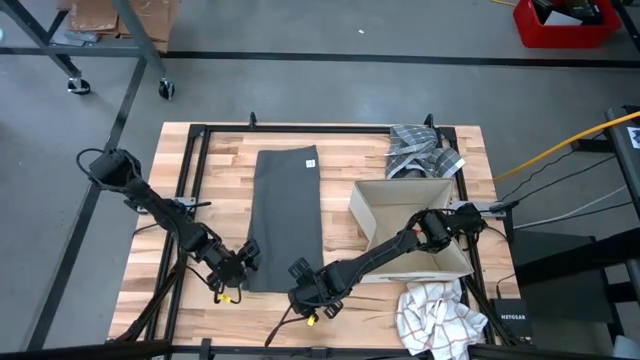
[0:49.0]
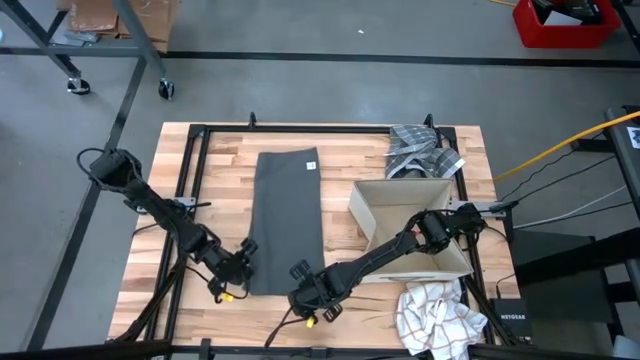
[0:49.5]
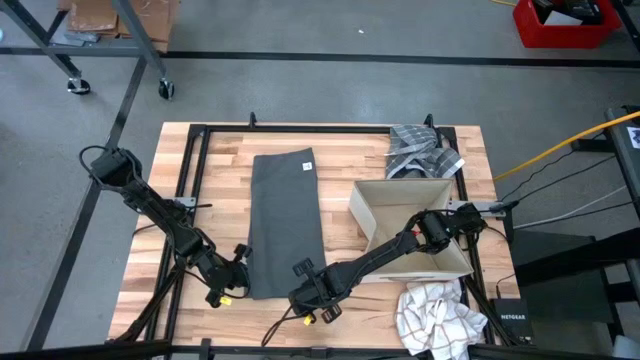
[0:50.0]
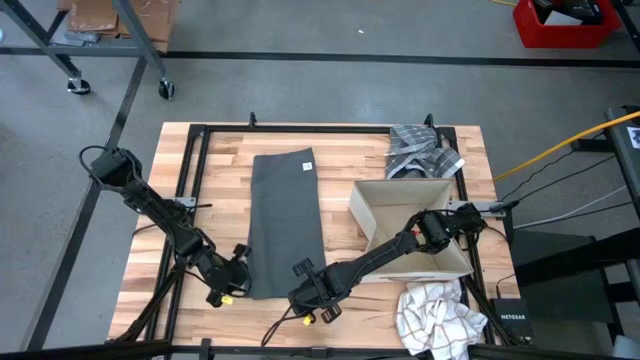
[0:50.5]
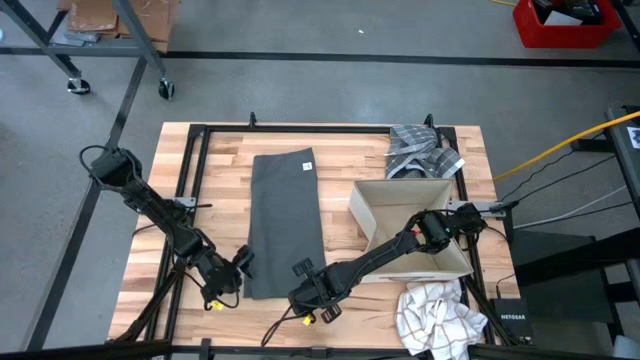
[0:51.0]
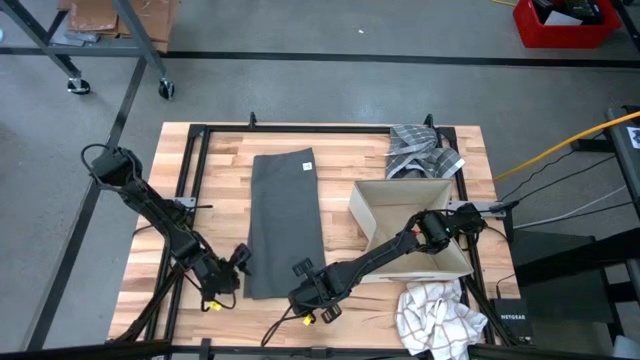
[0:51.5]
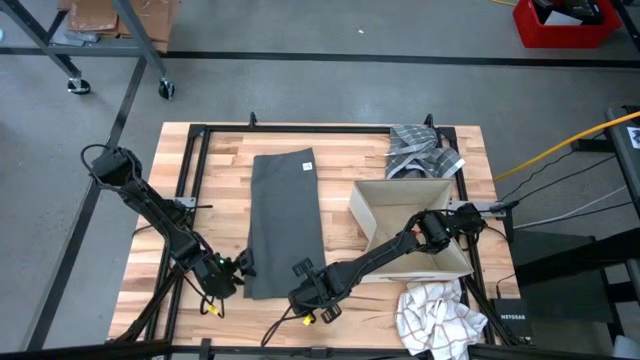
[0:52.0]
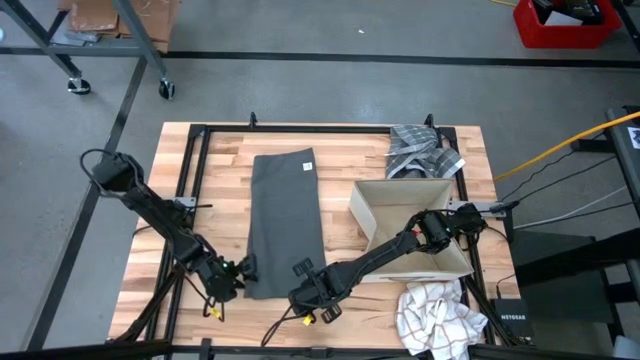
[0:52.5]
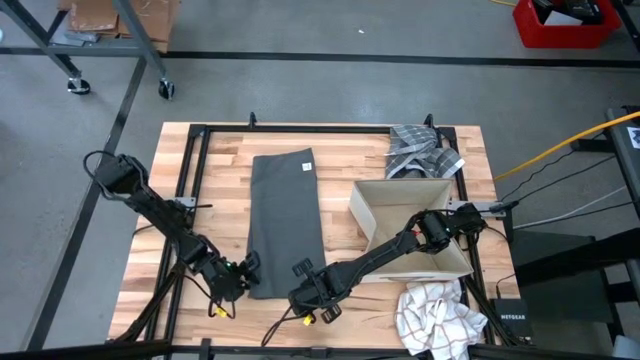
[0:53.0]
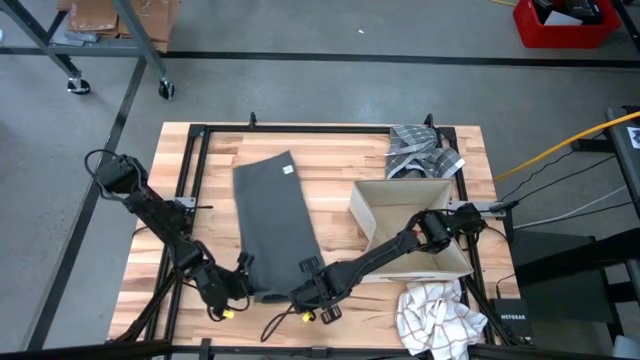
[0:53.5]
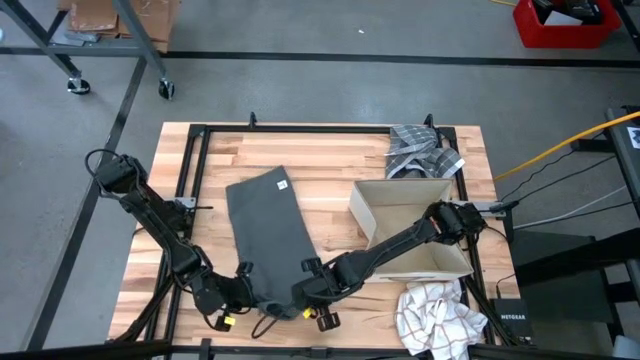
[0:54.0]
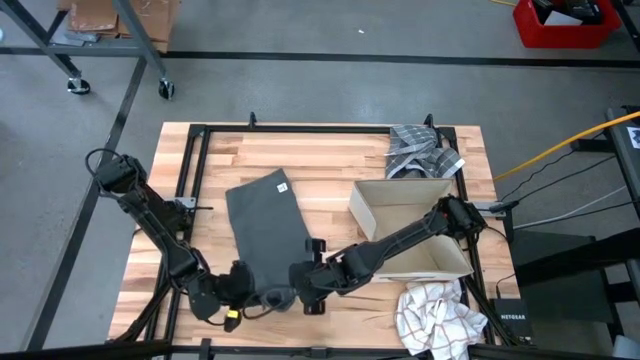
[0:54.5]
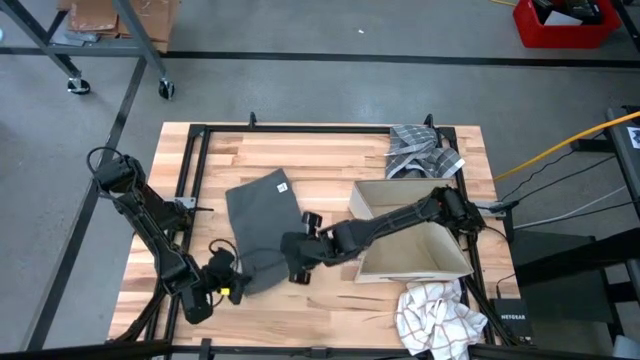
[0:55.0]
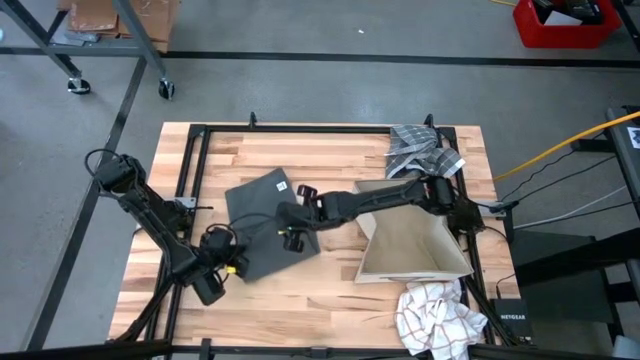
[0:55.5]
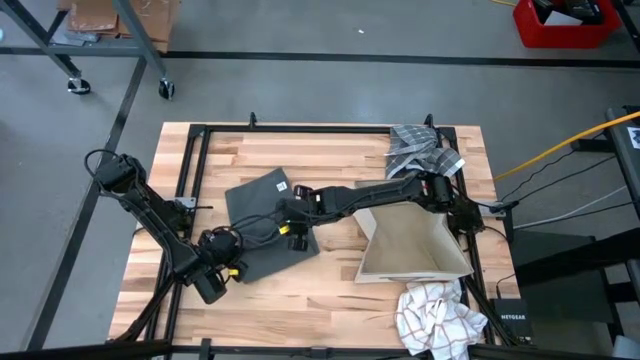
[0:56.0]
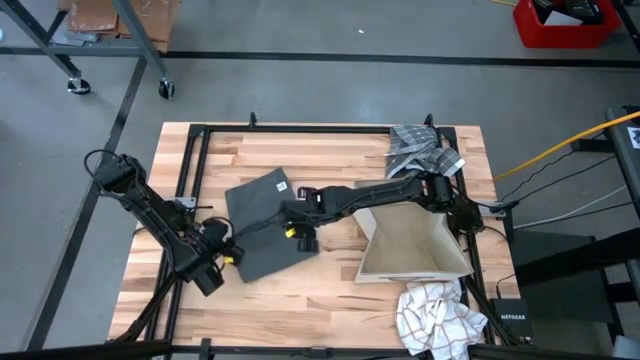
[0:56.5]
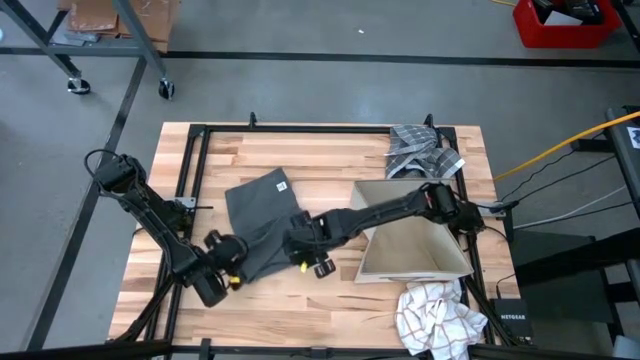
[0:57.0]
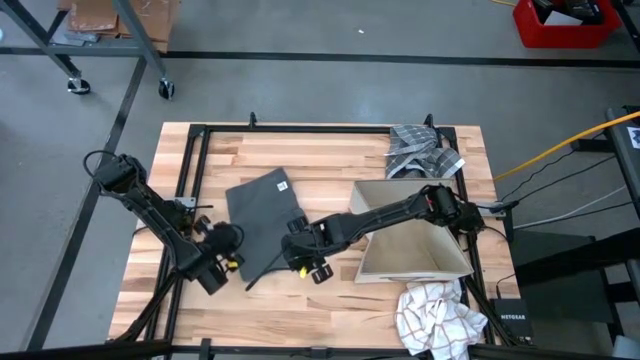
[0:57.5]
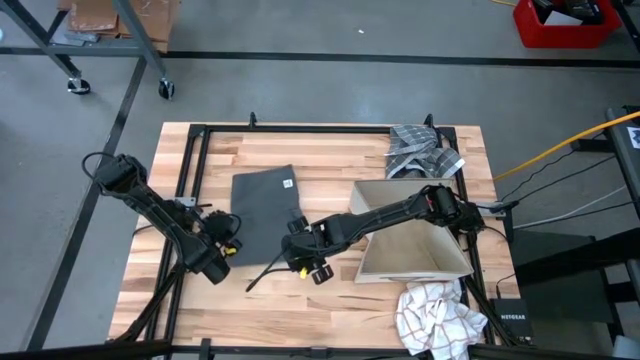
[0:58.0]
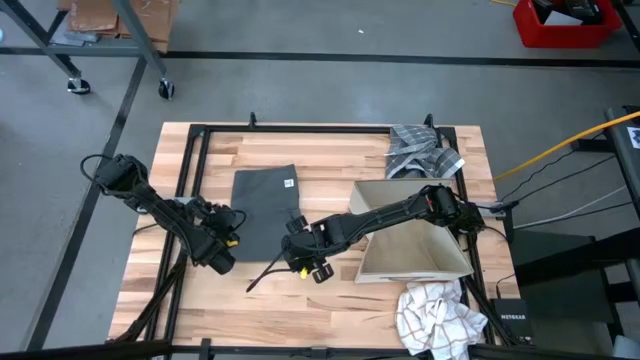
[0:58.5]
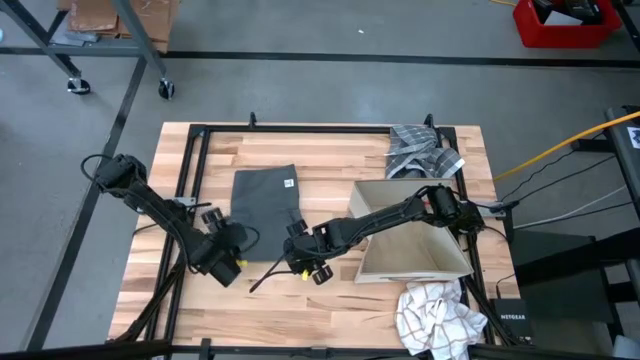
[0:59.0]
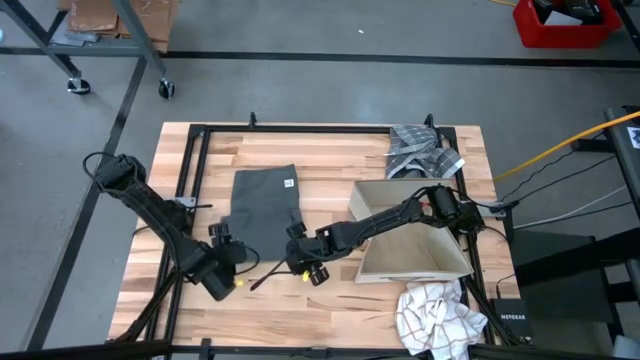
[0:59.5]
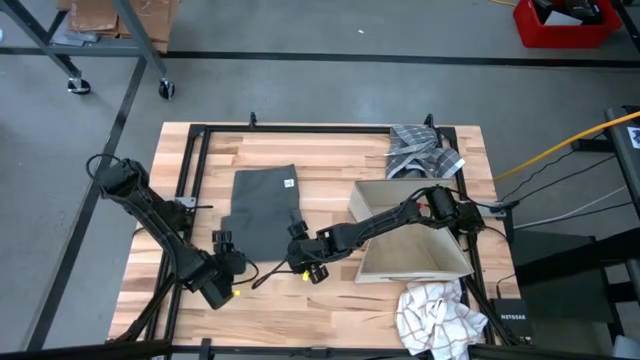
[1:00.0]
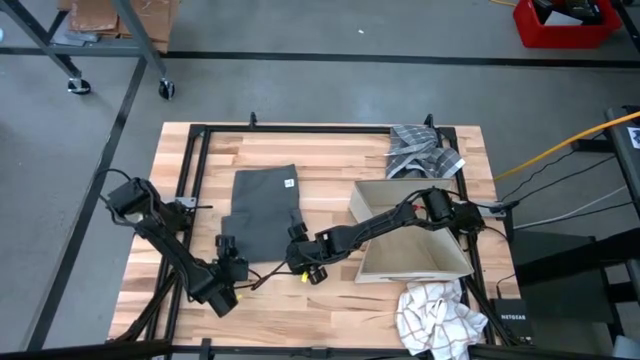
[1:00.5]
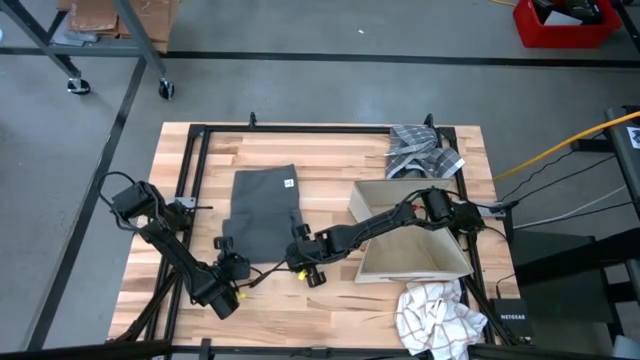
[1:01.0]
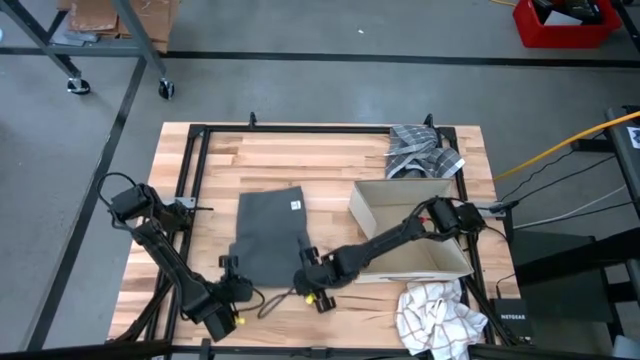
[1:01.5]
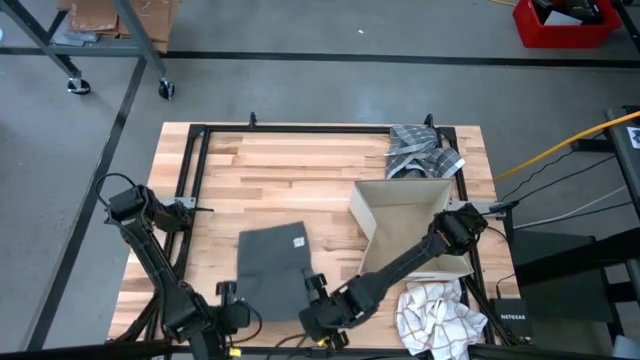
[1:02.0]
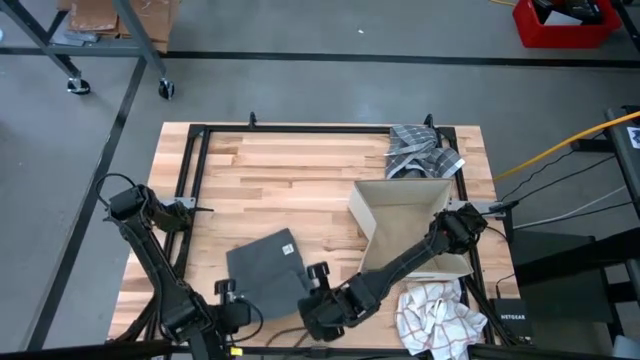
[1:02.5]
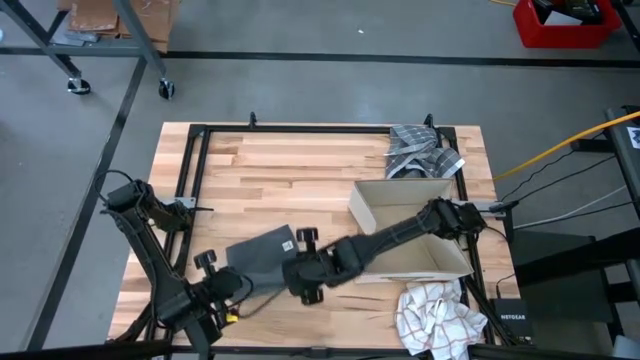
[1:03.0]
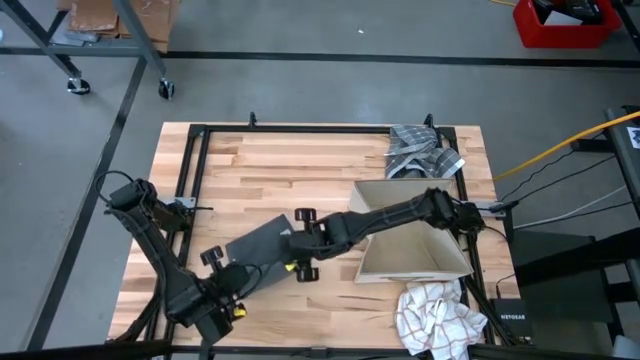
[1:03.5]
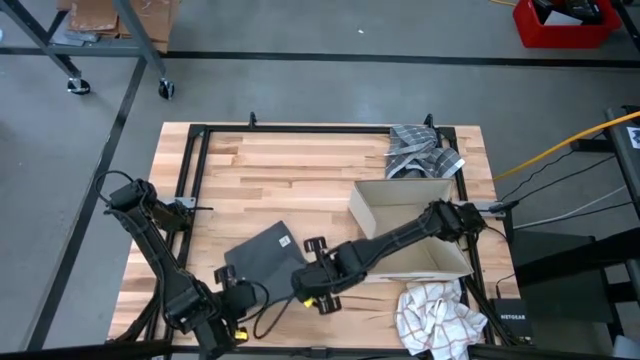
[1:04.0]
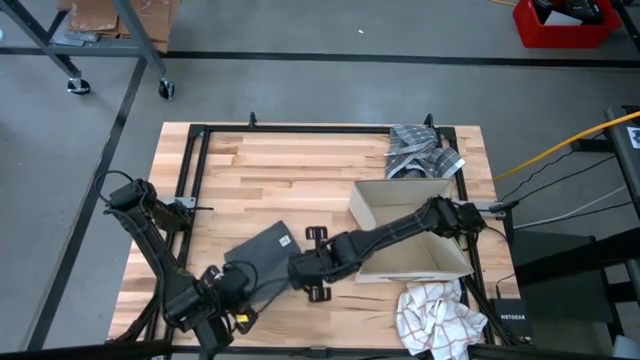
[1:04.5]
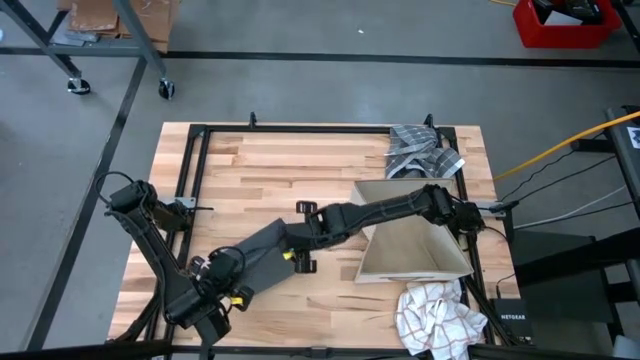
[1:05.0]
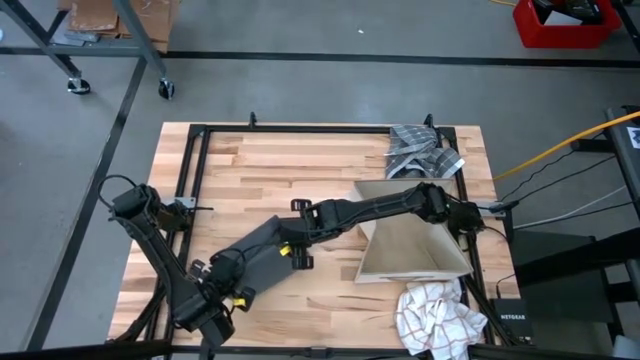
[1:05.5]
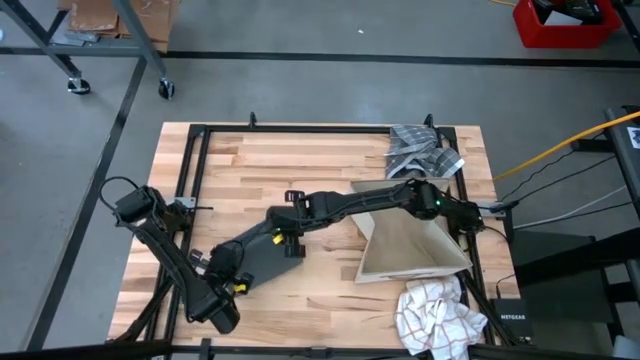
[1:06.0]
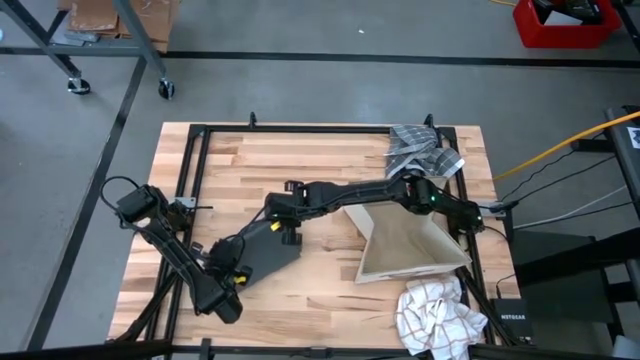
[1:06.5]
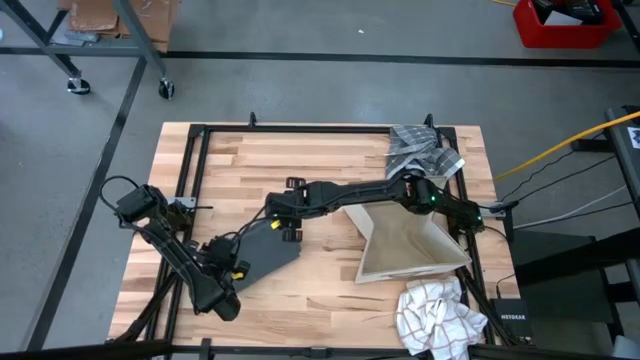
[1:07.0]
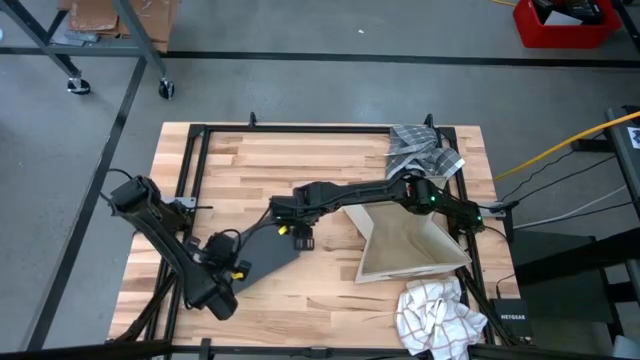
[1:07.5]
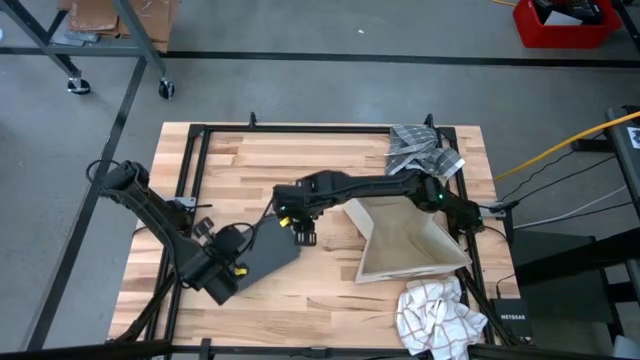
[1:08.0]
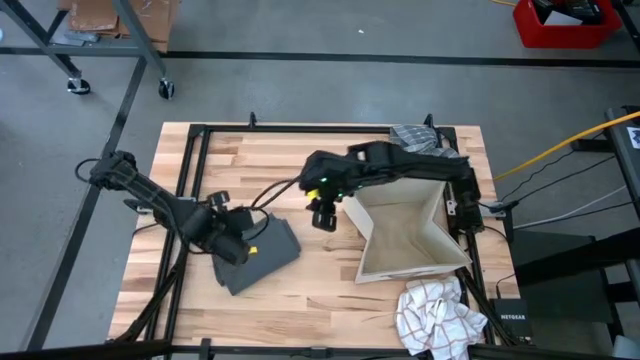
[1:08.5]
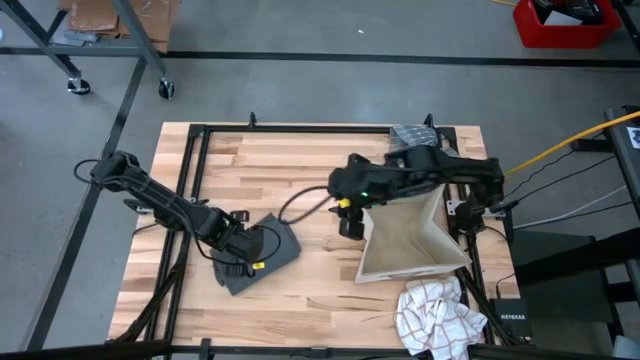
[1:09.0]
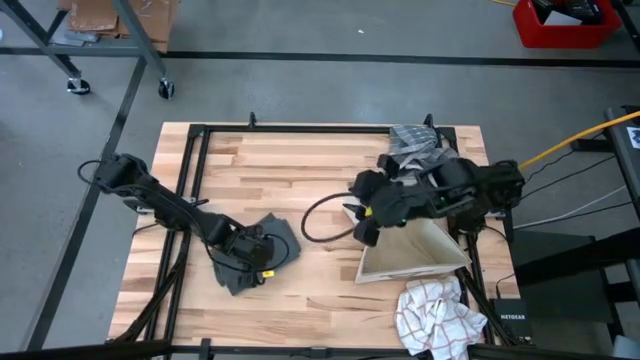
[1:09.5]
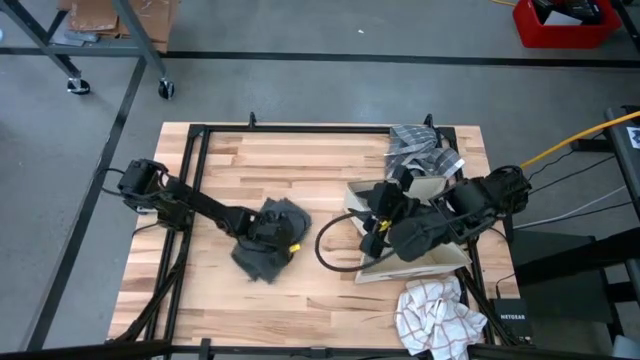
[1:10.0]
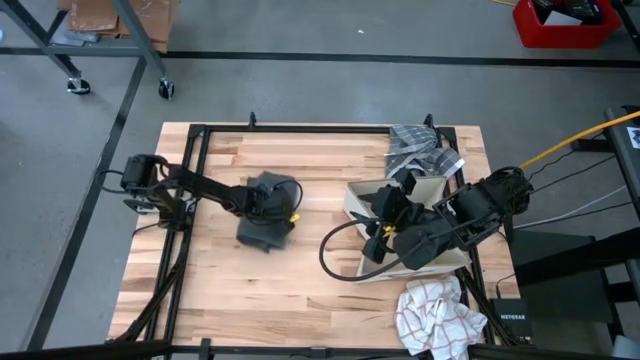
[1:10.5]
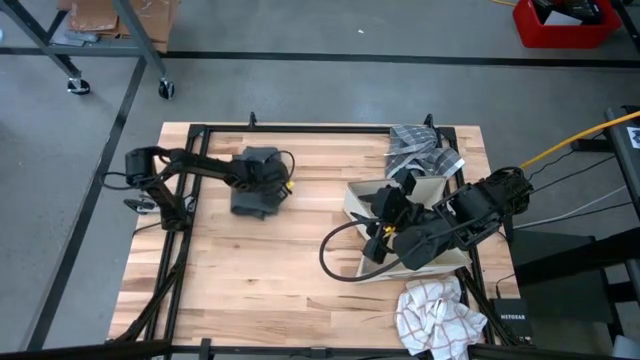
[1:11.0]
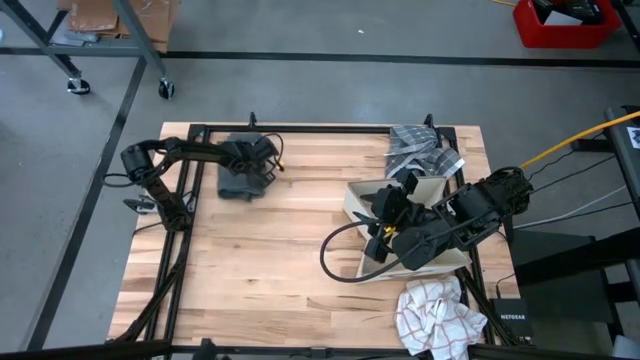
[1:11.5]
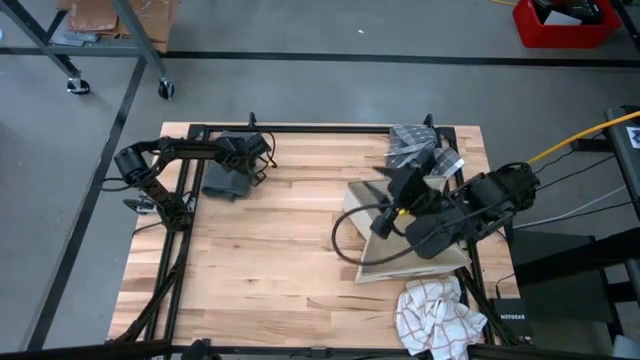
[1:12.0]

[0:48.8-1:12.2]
Task: Fold towel
Fold the gray towel
